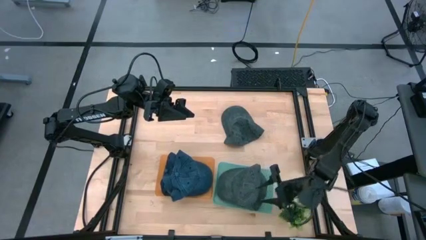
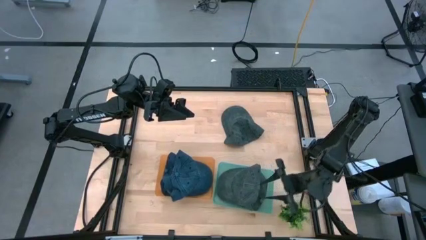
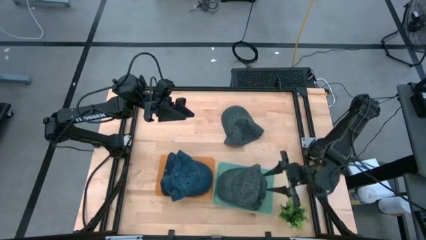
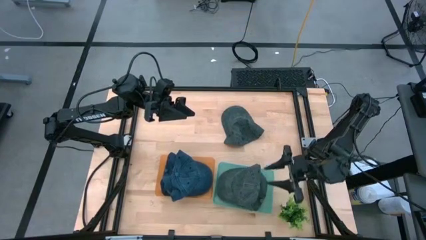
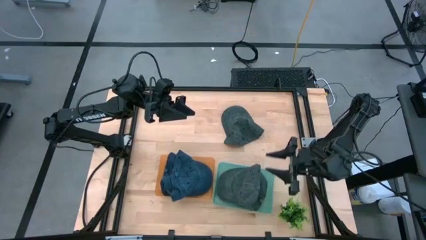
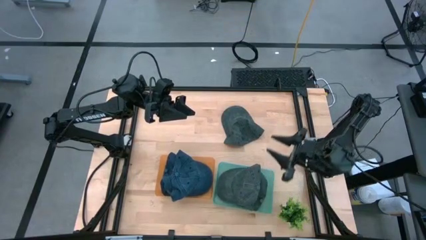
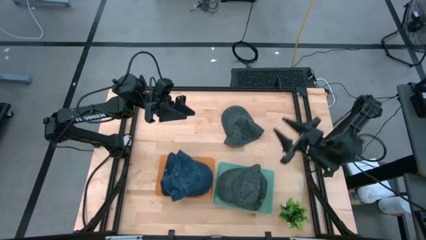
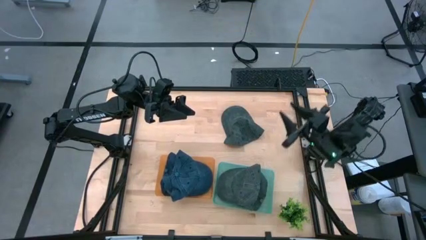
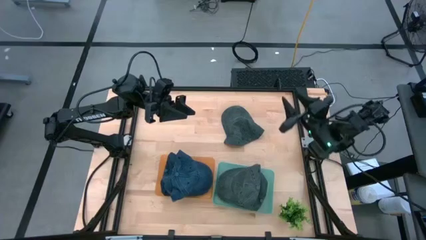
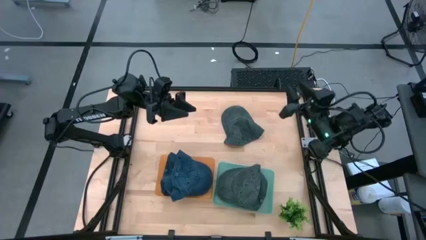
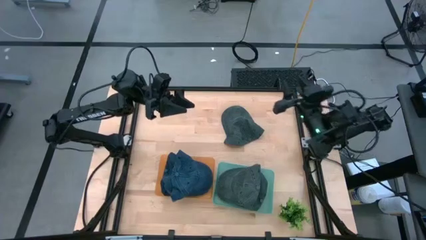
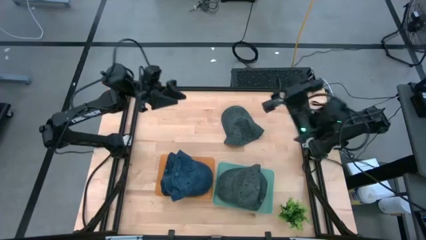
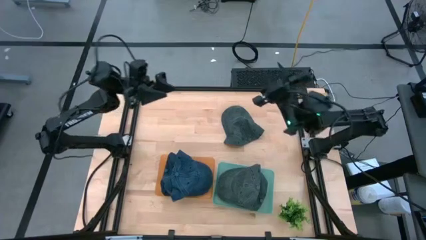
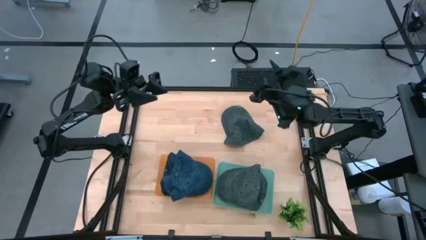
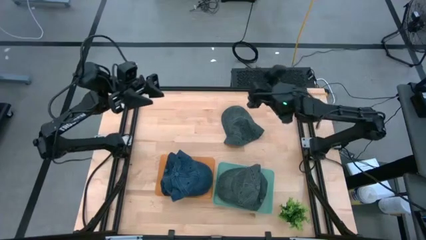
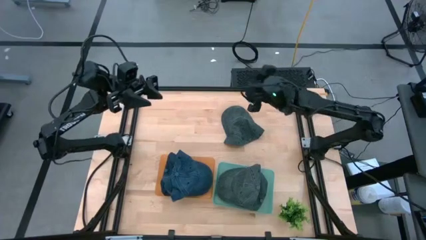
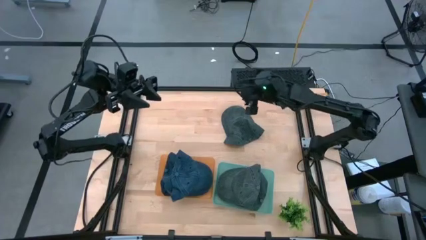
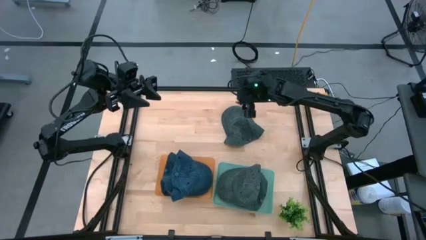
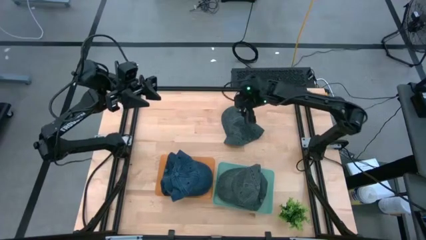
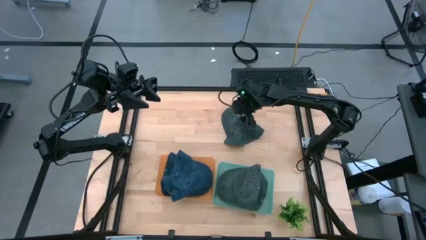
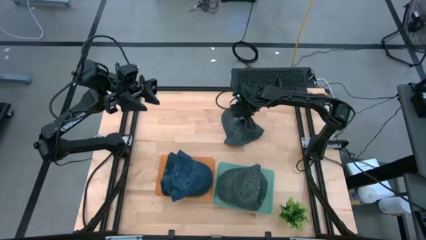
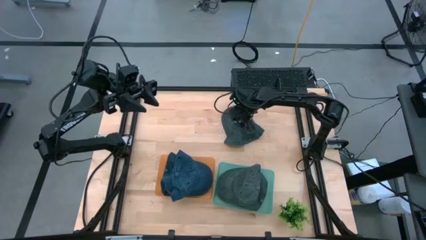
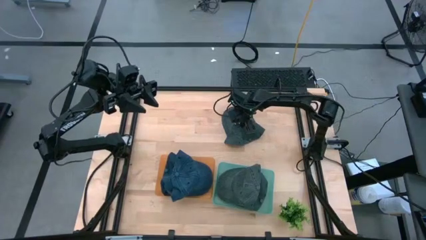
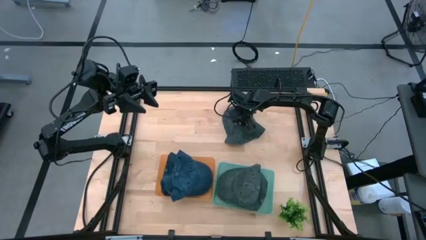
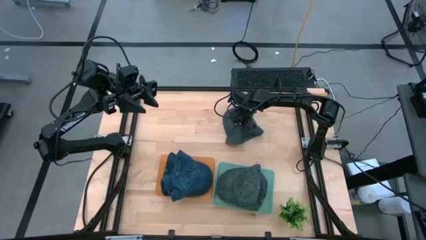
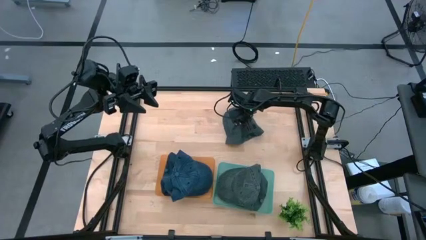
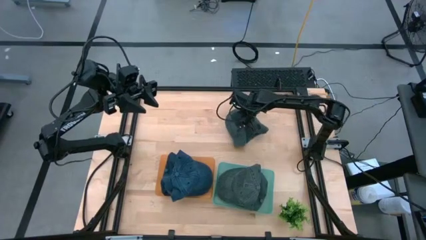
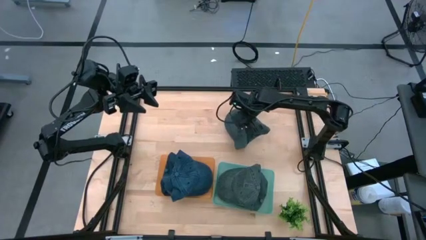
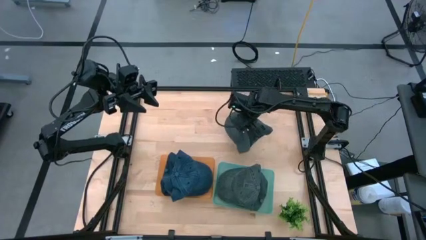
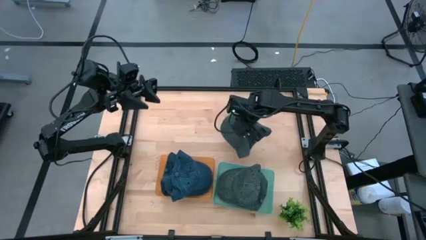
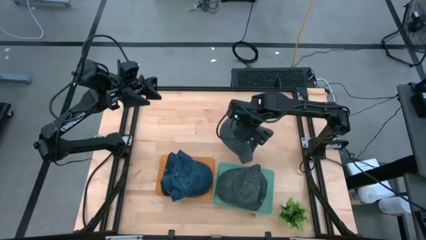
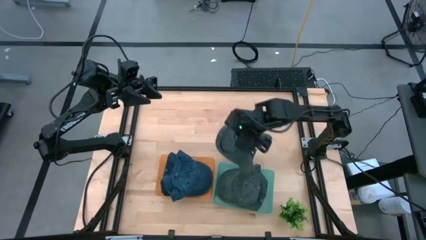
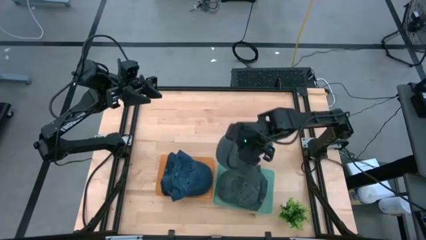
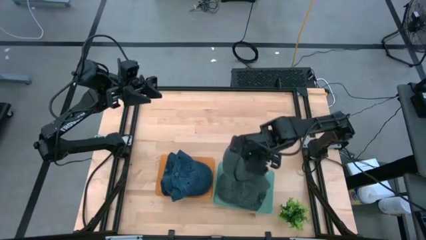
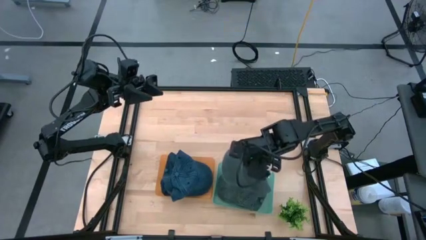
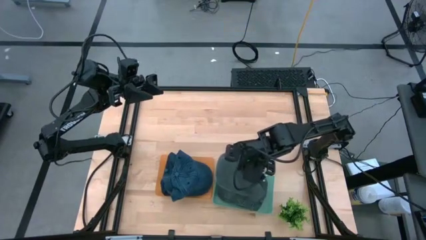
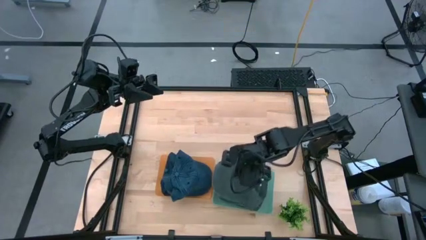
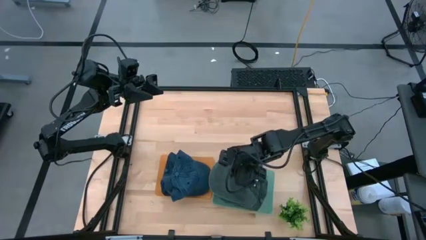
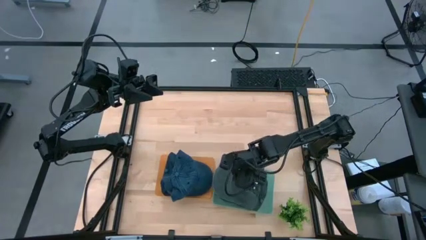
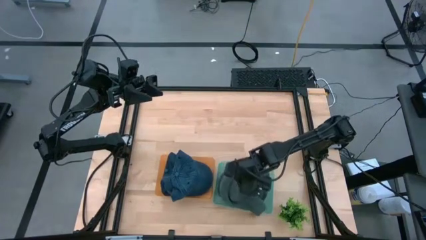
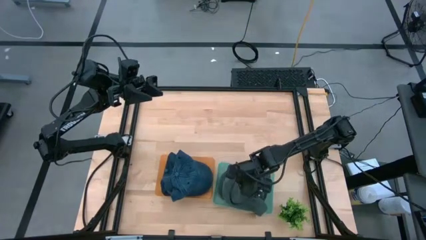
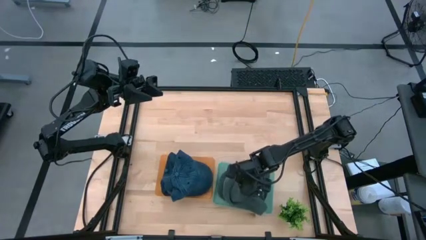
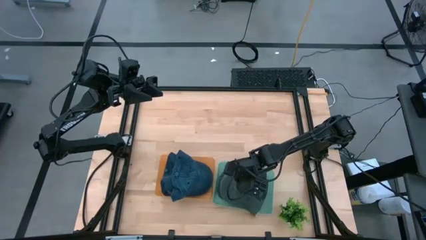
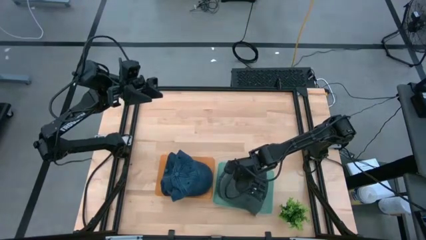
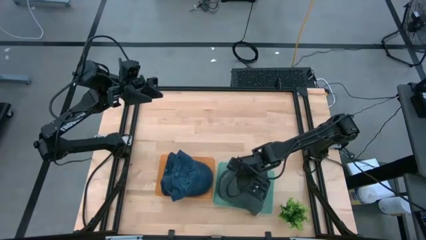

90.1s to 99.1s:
Task: Pick & Place hat
Put the gray cap into the blue green bin

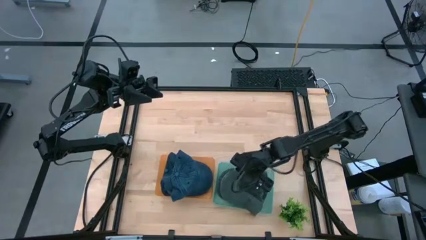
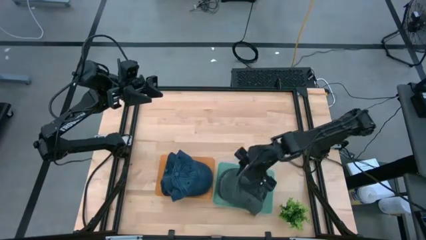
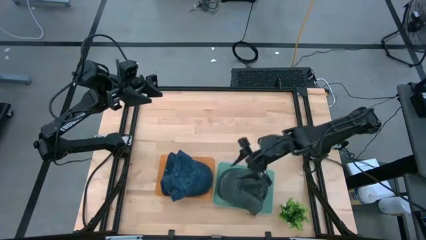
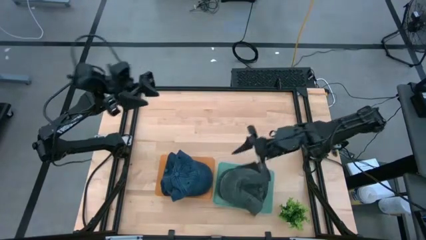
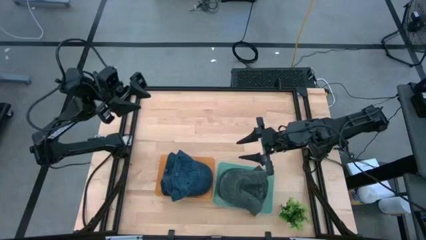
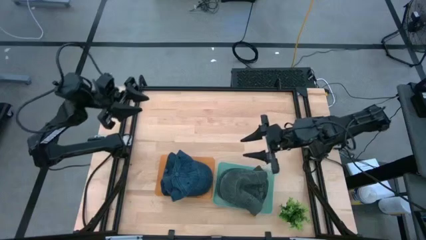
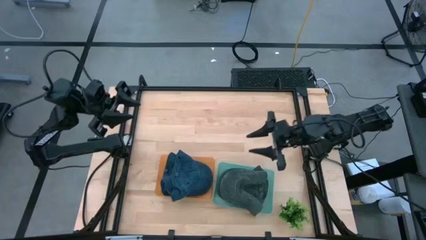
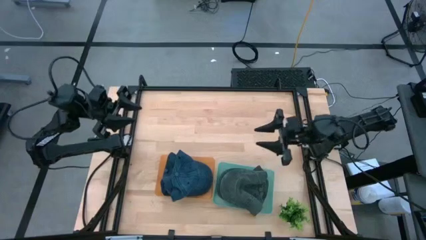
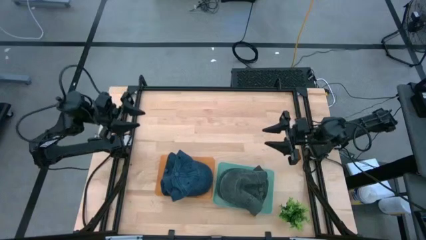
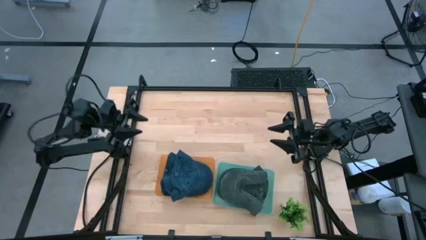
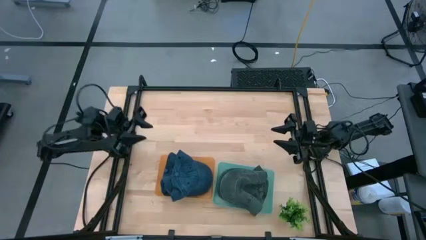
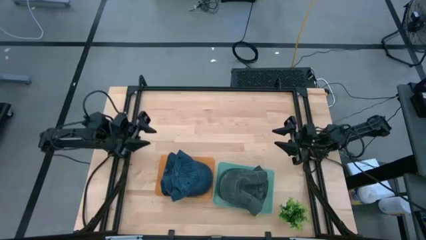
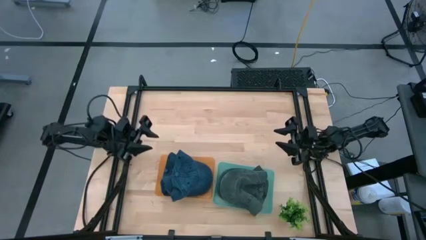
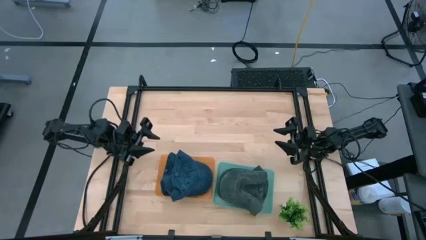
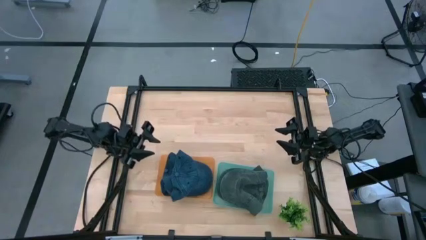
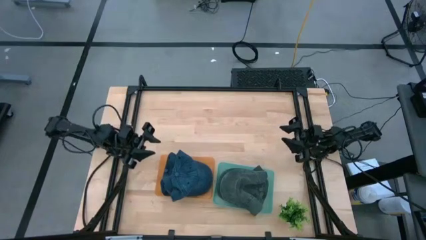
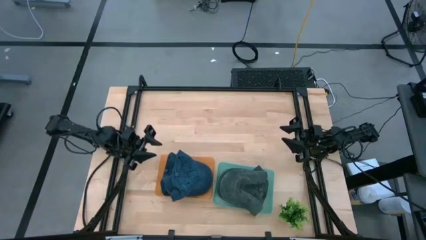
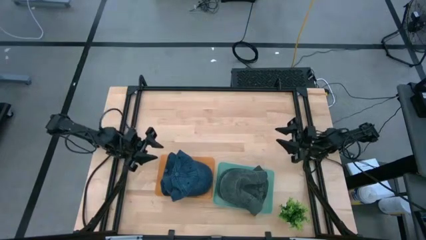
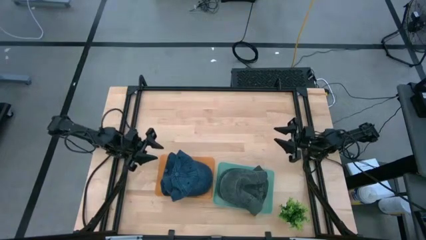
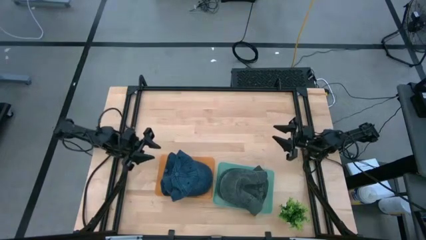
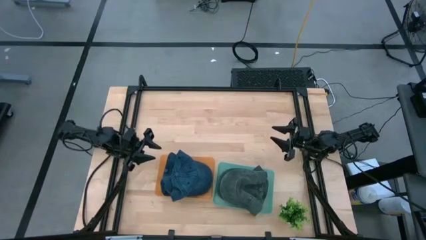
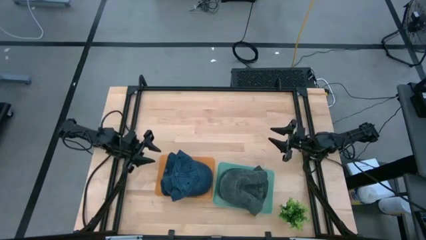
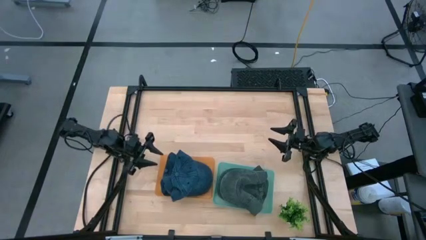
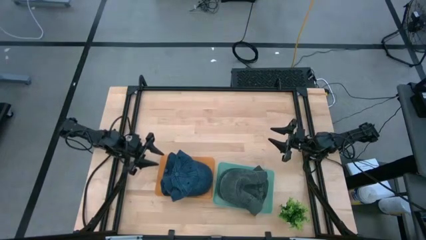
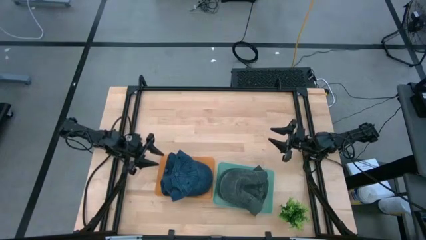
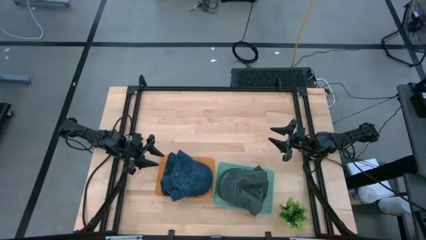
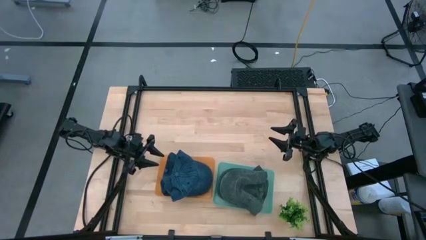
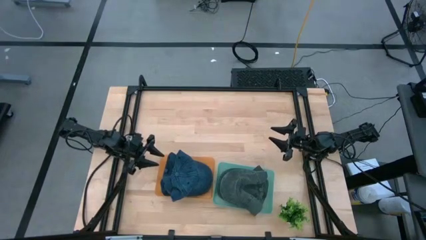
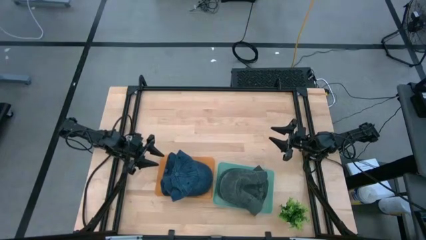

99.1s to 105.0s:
Return to Home Position

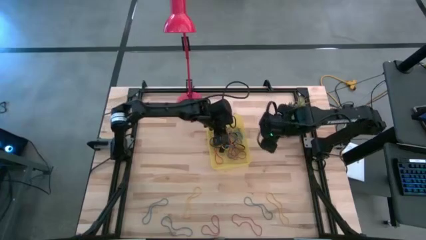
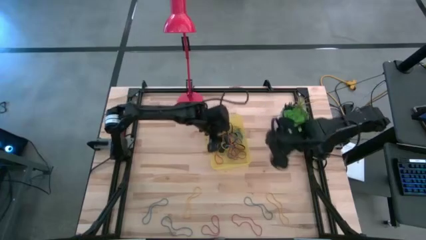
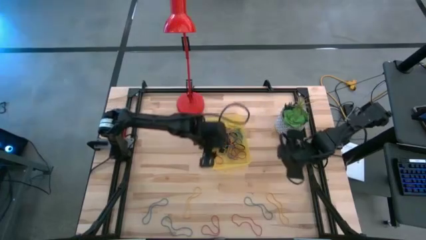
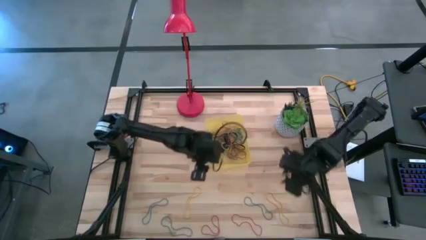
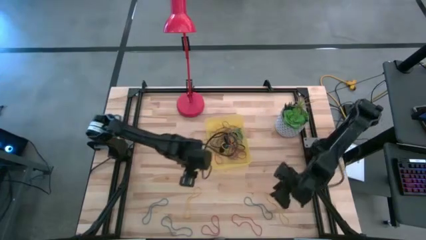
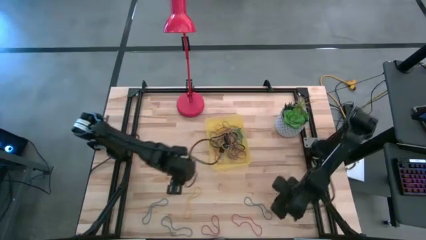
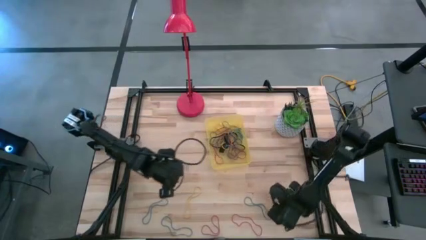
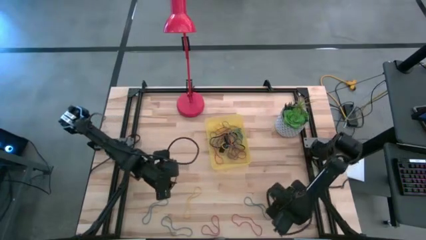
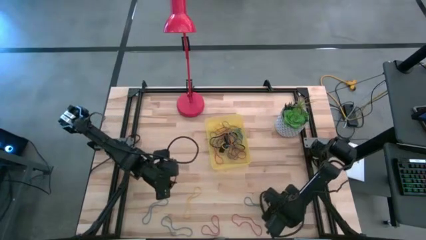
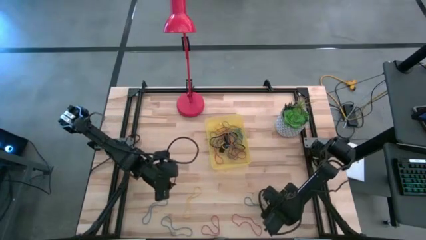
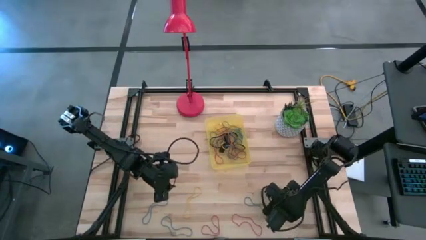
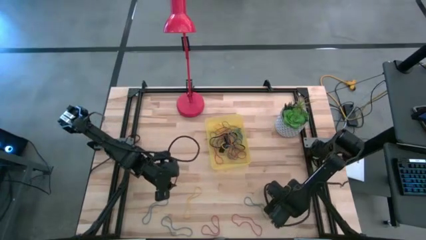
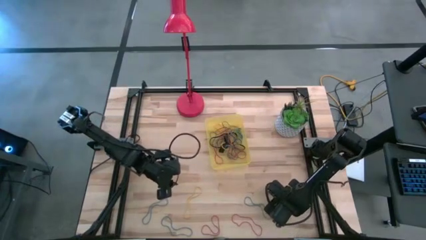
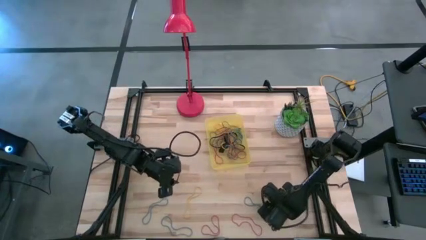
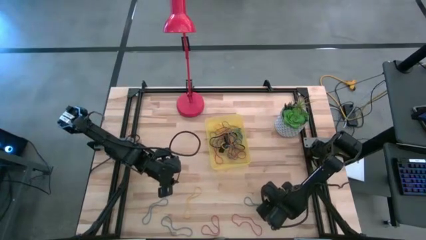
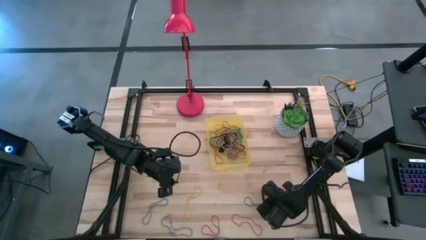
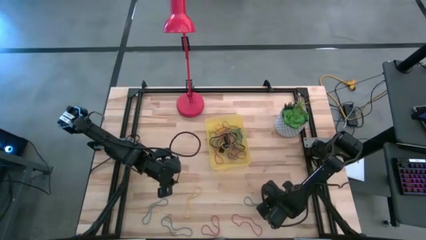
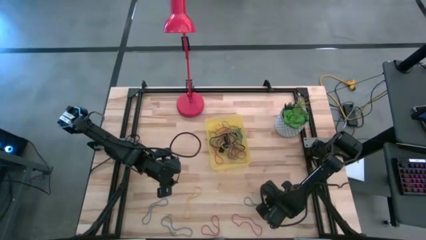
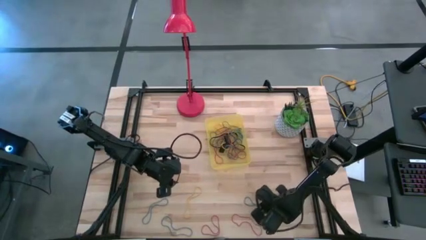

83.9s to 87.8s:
Task: Pick and place rubber bands into bin
Put the yellow rubber band into the yellow bin
